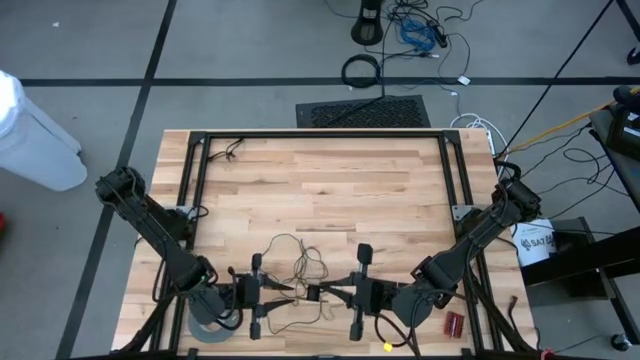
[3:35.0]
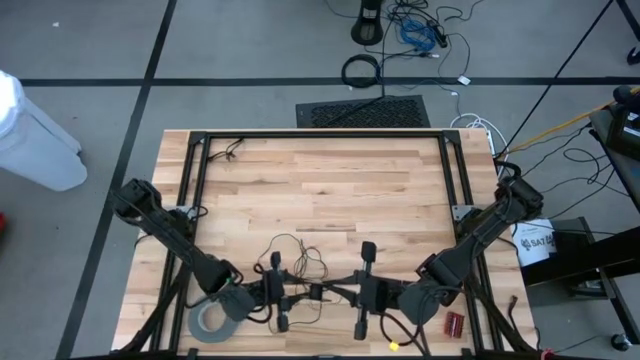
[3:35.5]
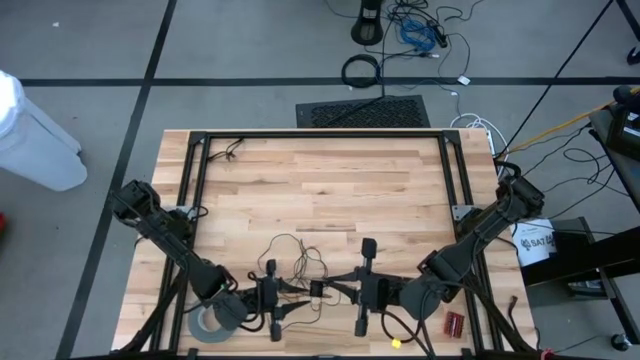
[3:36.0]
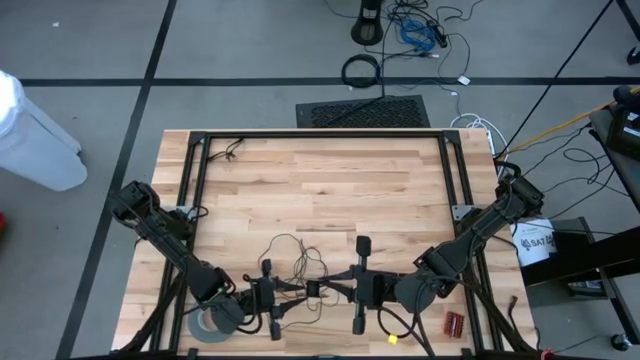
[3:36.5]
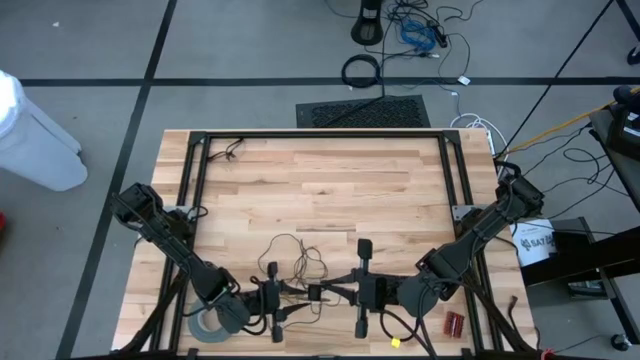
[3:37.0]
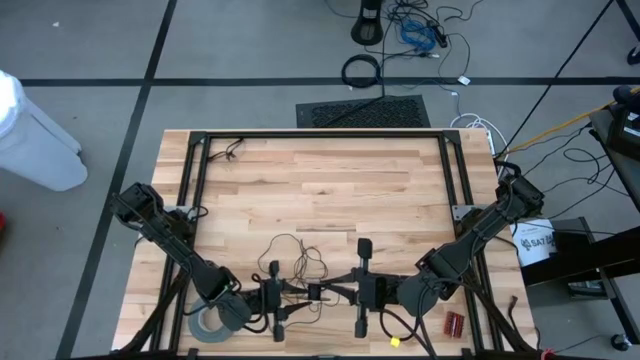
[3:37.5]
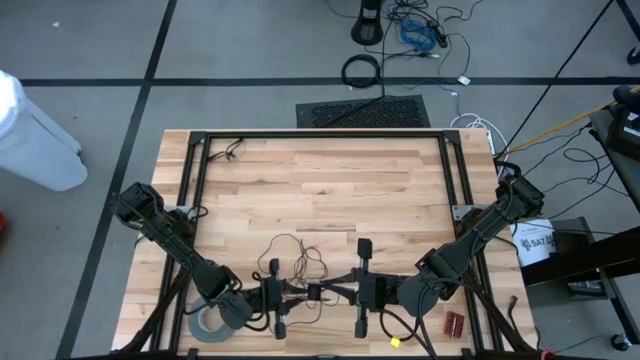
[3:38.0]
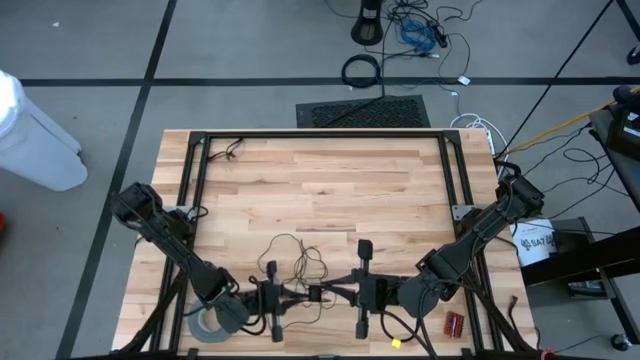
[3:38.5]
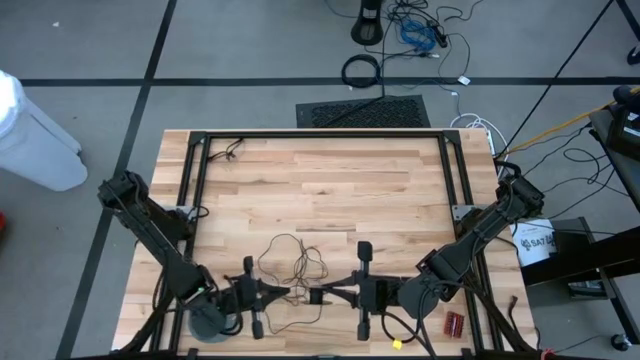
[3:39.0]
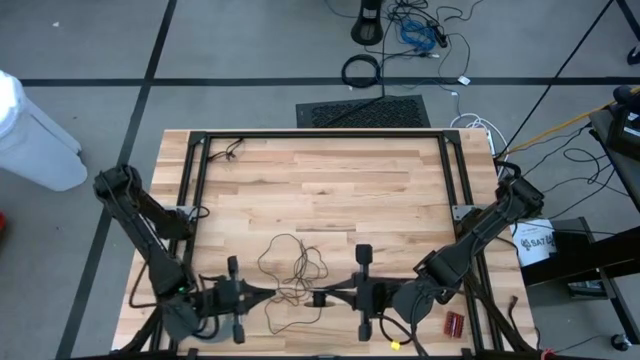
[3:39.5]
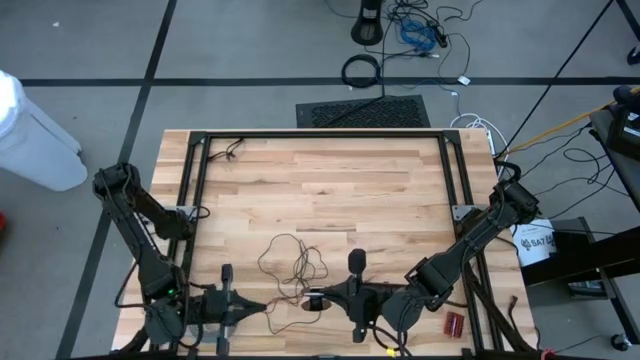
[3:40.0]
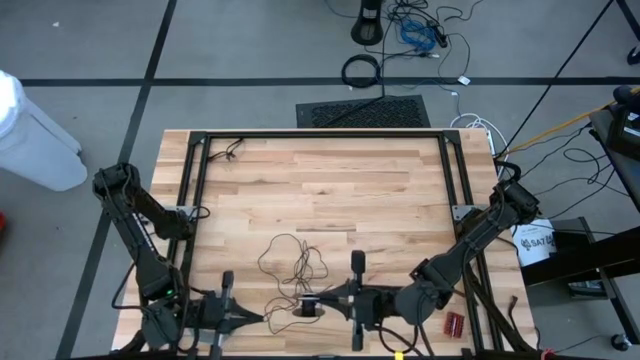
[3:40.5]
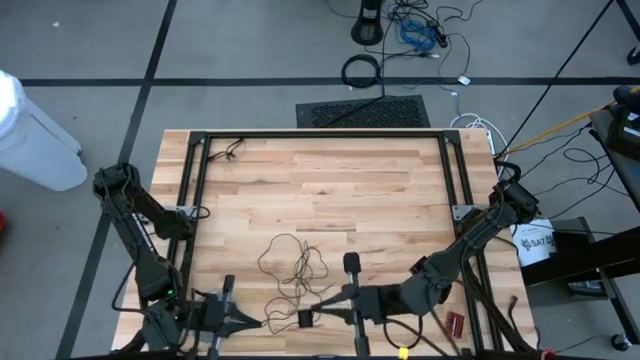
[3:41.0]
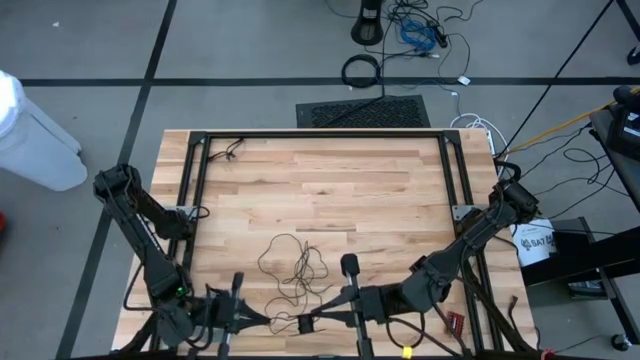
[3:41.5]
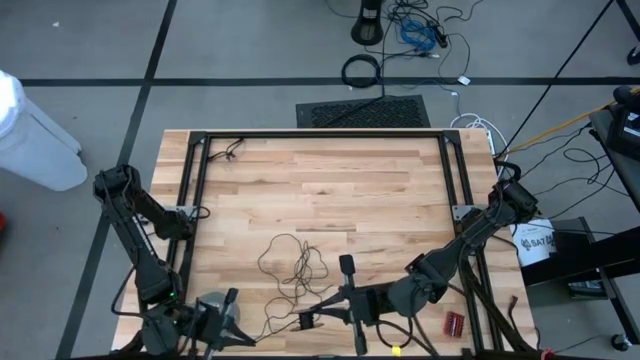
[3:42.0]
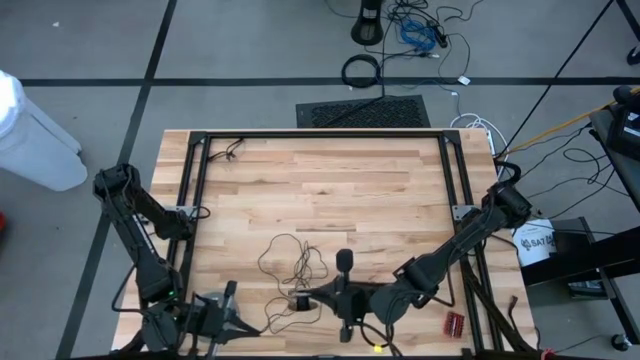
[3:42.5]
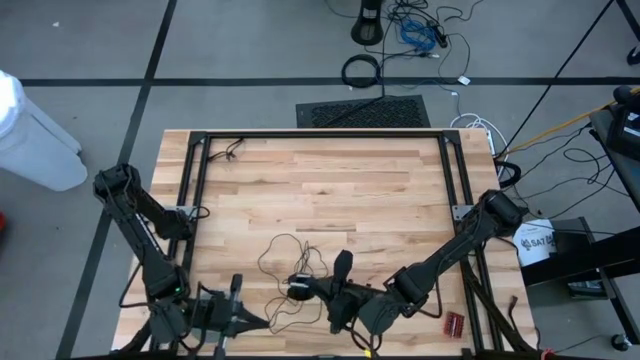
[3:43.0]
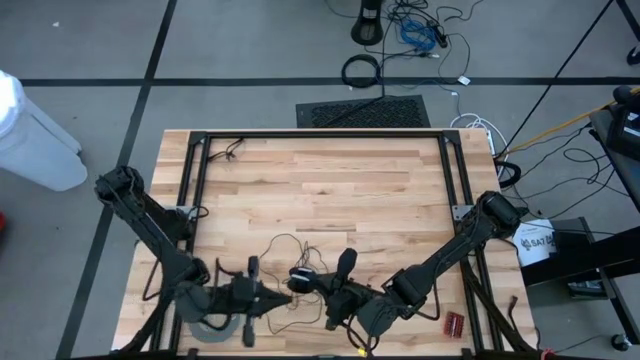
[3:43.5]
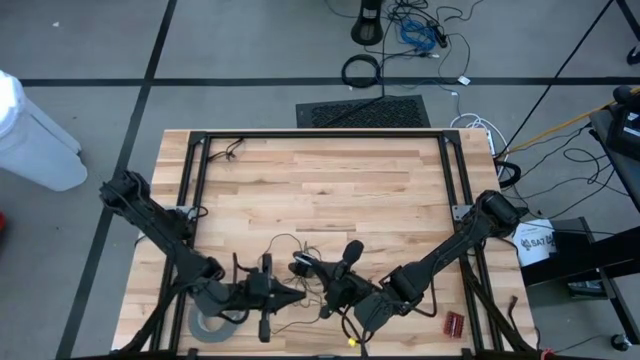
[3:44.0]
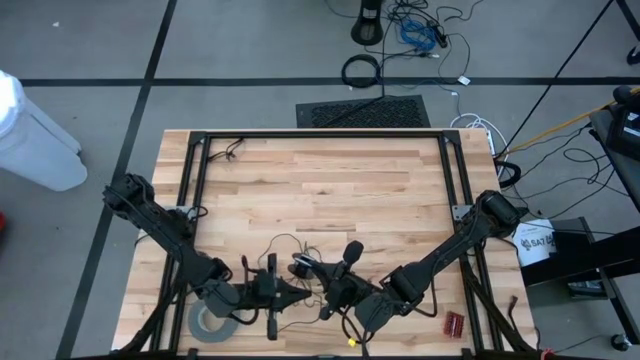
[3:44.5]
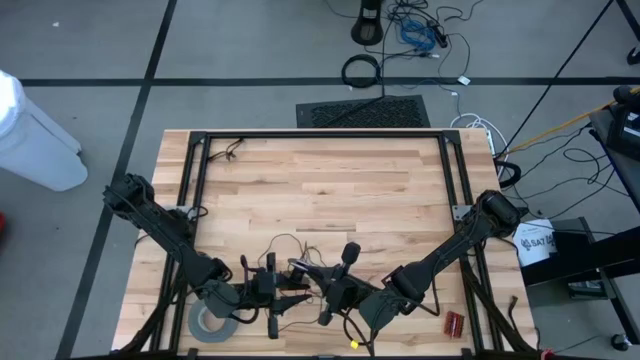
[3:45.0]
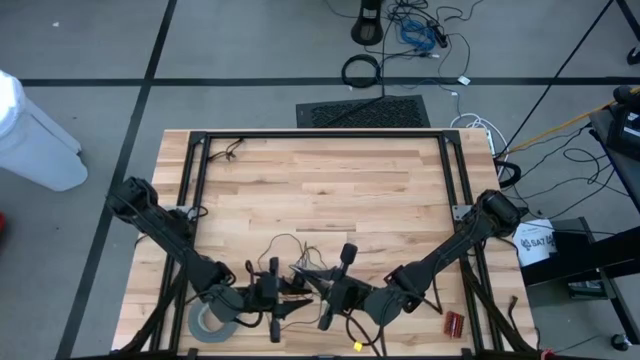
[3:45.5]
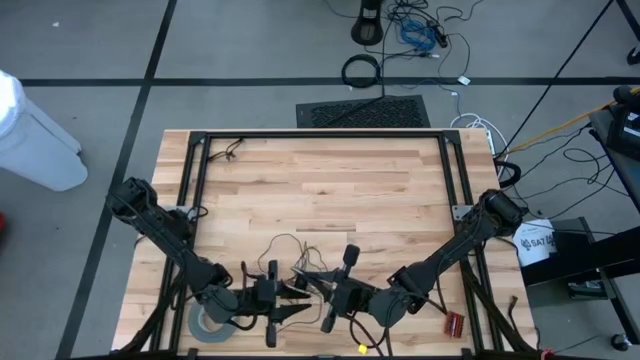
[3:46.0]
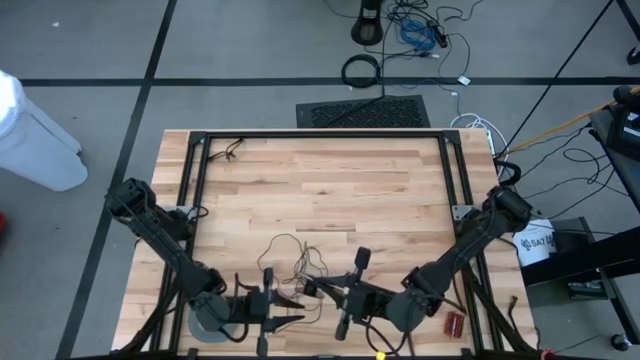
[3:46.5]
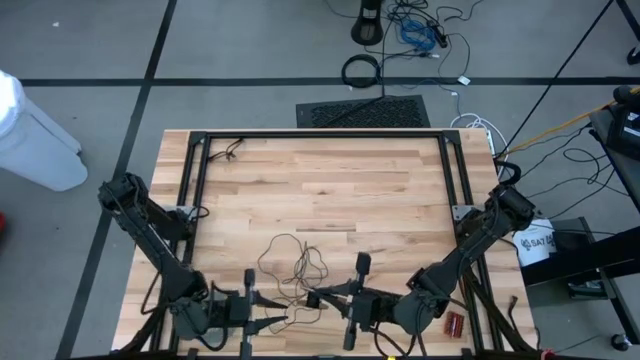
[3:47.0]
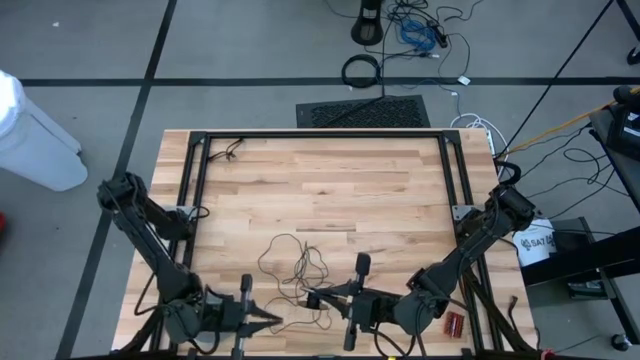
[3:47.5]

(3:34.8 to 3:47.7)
Task: Coil cords
Coil the black wire onto the spool

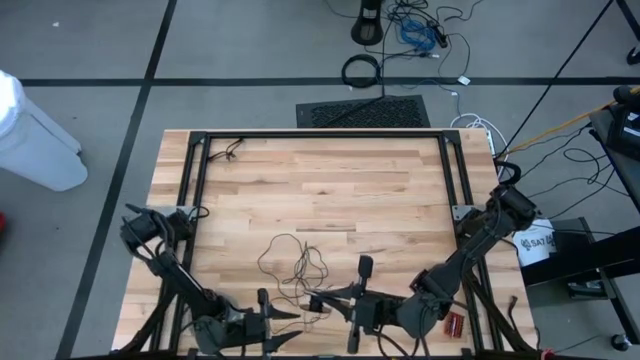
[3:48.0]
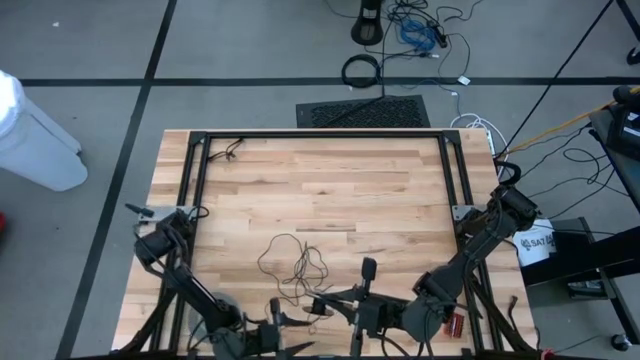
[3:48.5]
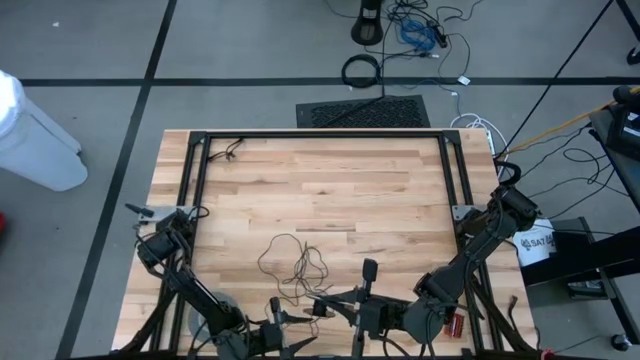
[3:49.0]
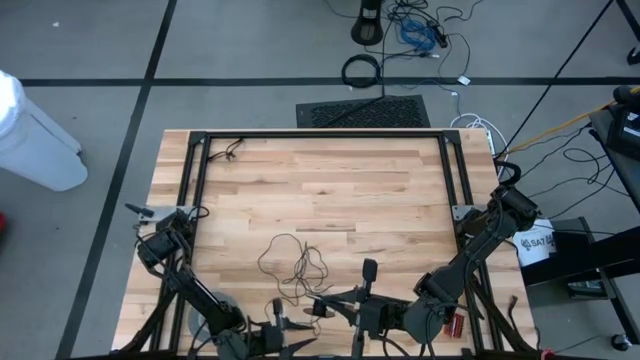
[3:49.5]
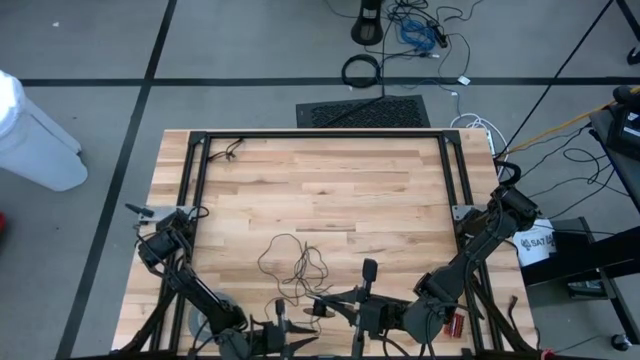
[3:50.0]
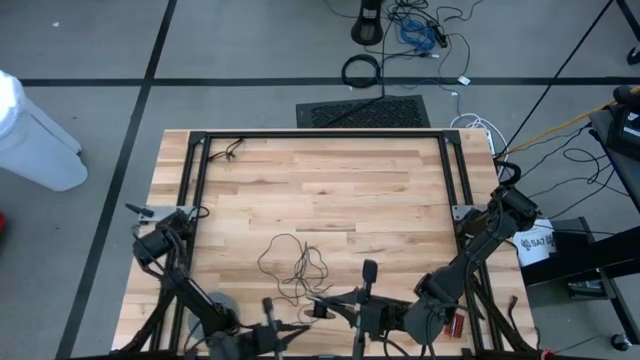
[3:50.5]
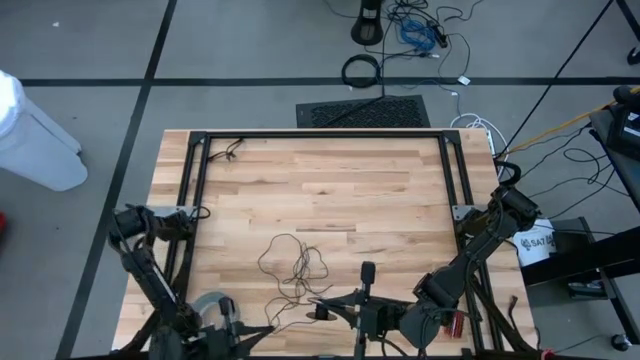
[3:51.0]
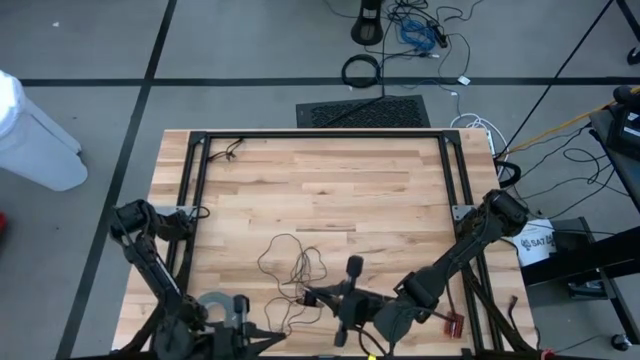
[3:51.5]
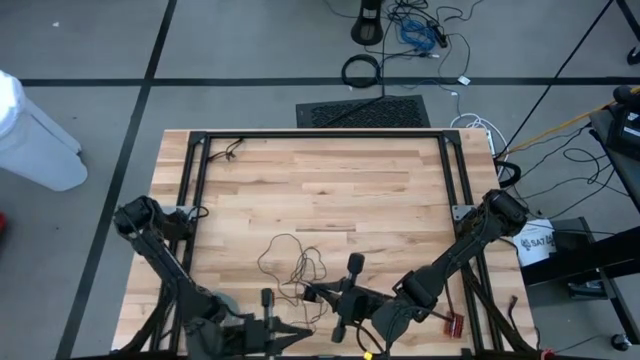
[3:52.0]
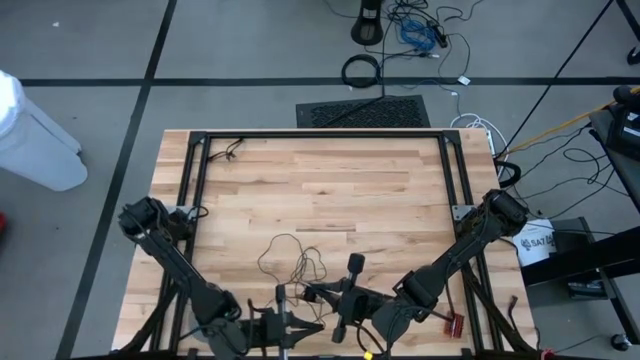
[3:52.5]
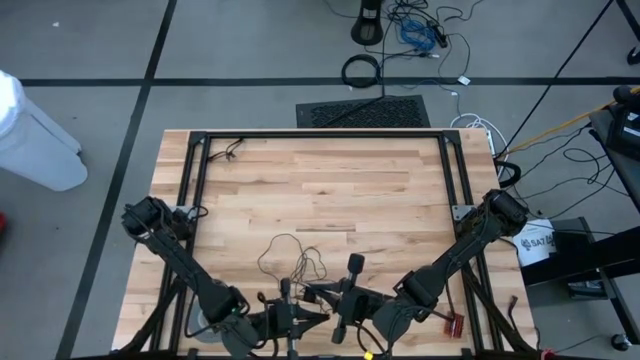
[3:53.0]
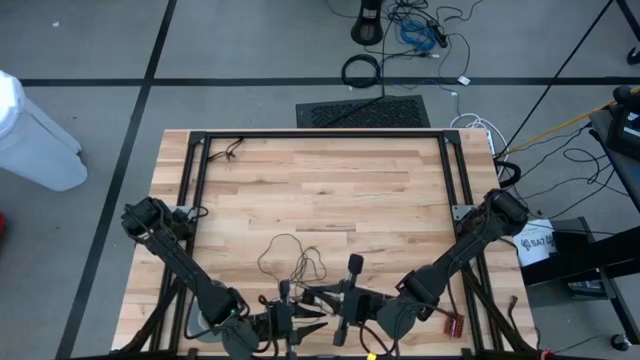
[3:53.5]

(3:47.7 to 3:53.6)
Coil the black wire onto the spool

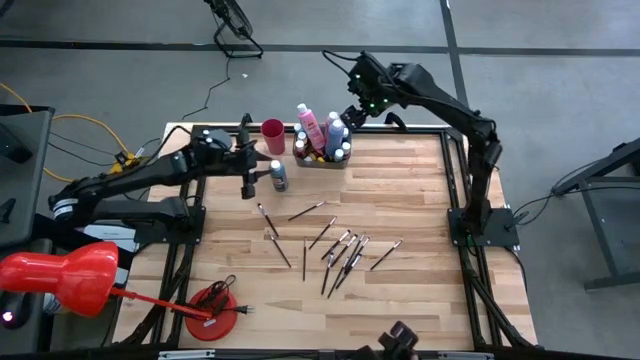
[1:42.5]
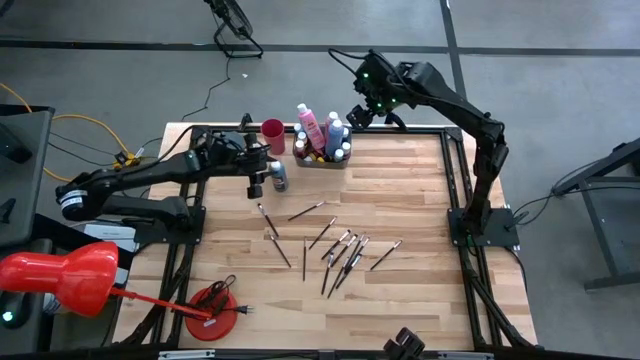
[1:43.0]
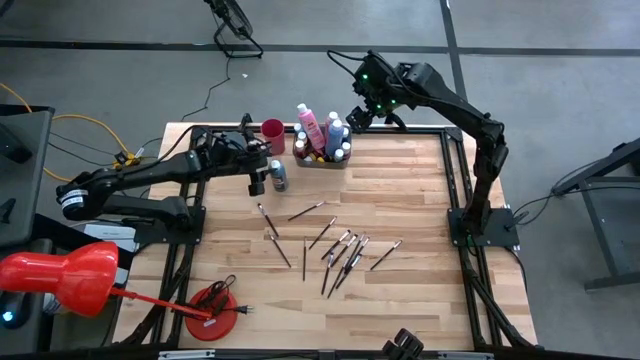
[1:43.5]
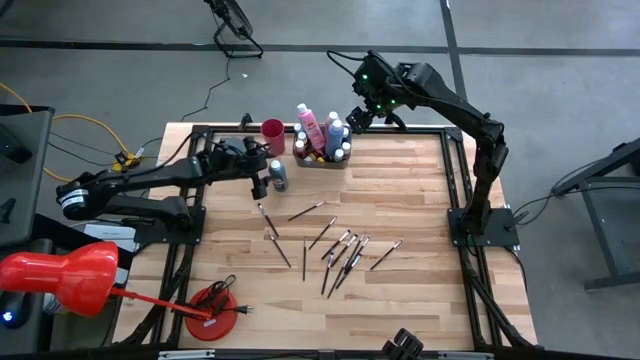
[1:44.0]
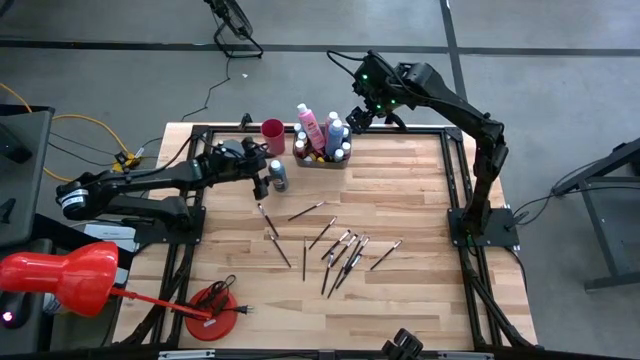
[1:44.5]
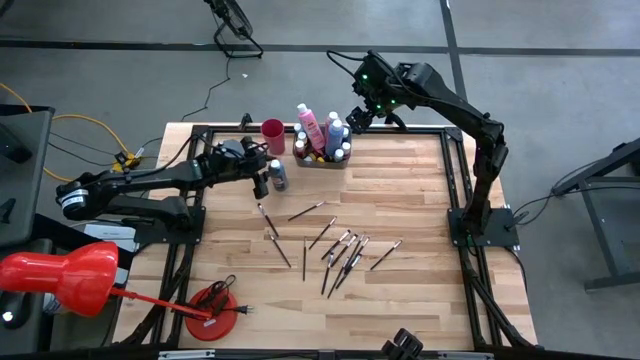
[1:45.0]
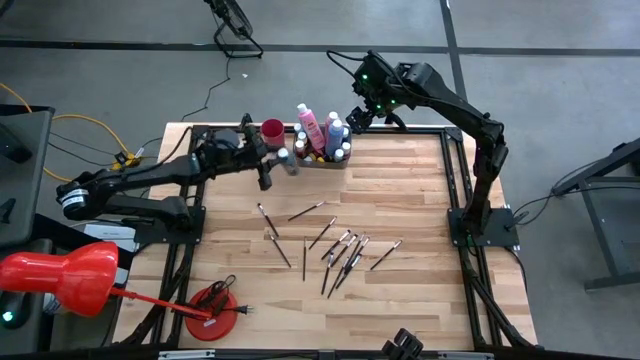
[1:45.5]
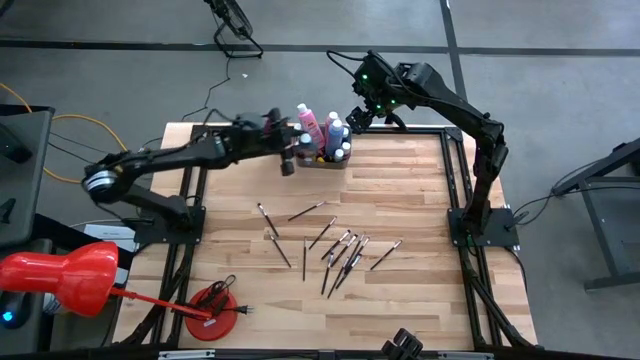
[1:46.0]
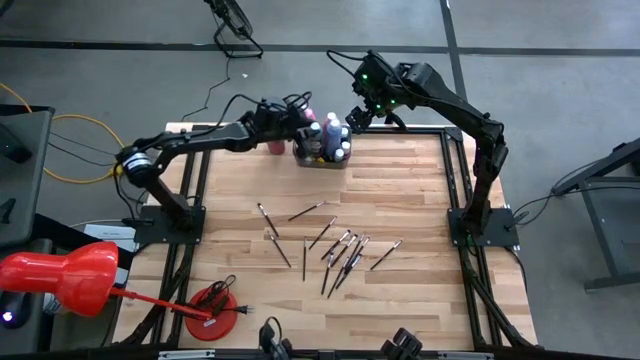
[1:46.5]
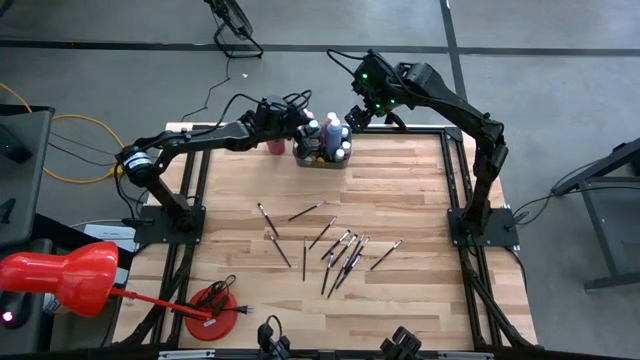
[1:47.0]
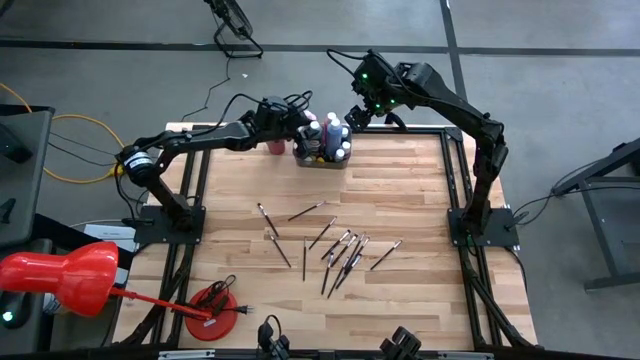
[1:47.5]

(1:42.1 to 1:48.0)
Task: Pick & Place Paint Supplies
Put the big black paint bottle into the black bin
